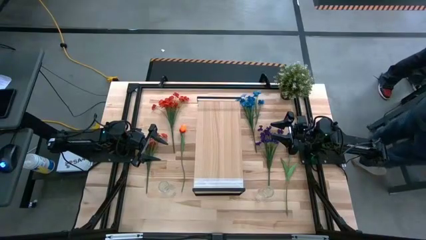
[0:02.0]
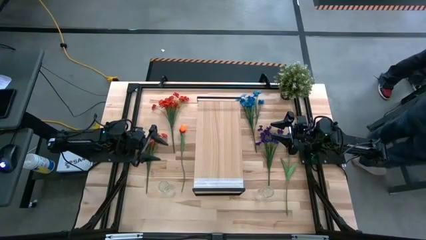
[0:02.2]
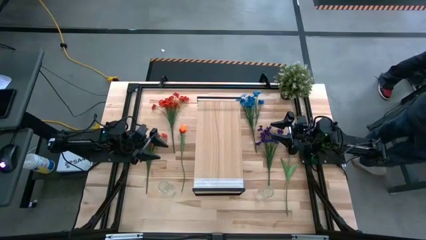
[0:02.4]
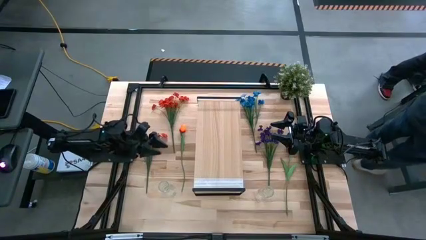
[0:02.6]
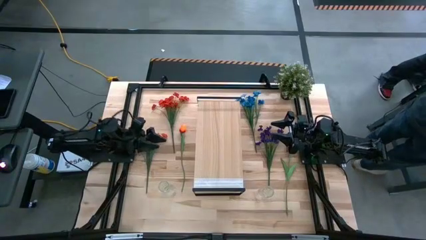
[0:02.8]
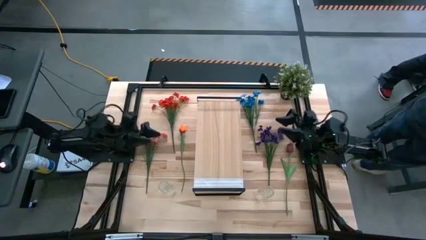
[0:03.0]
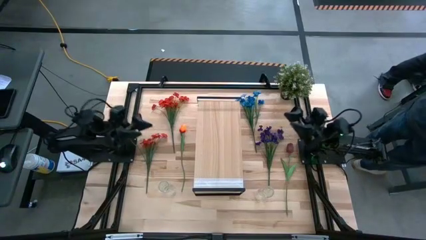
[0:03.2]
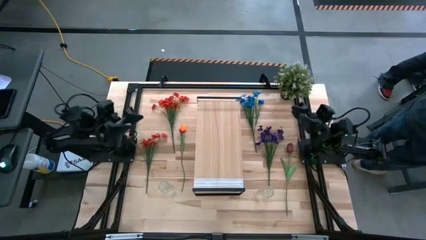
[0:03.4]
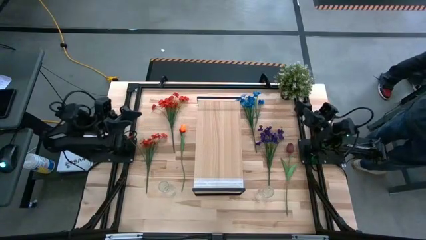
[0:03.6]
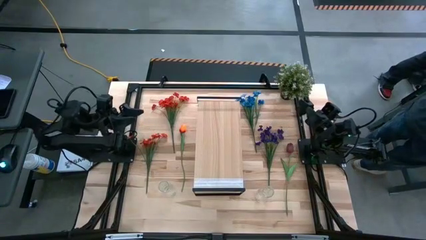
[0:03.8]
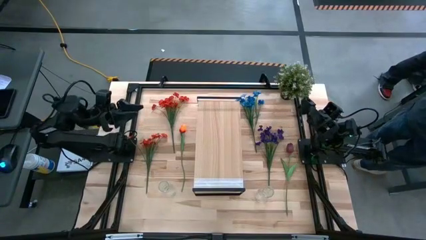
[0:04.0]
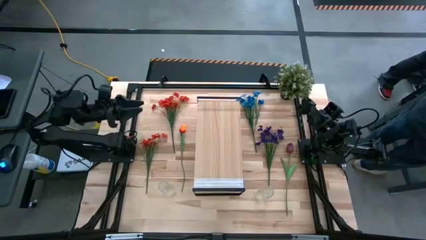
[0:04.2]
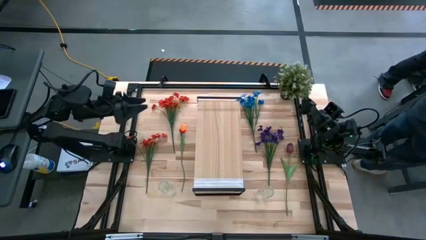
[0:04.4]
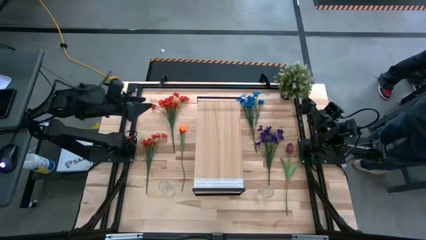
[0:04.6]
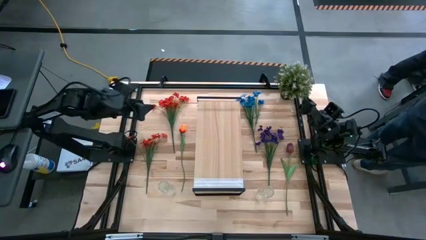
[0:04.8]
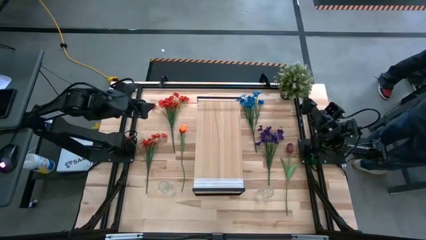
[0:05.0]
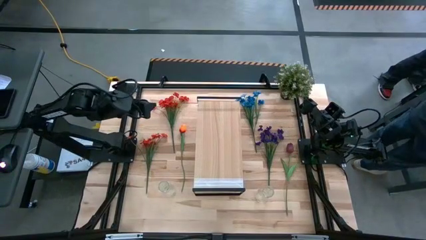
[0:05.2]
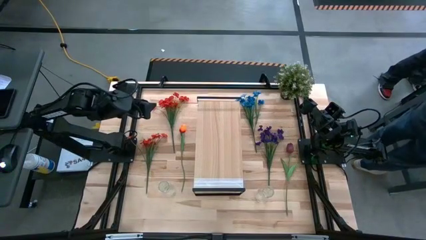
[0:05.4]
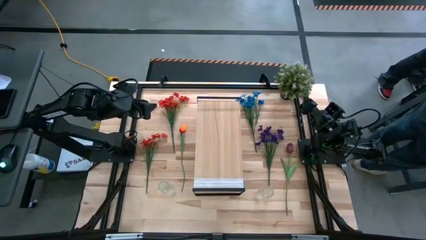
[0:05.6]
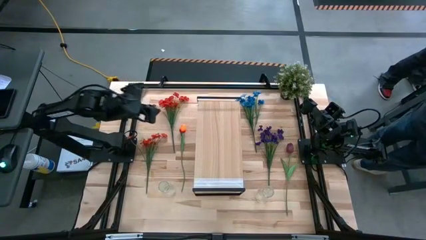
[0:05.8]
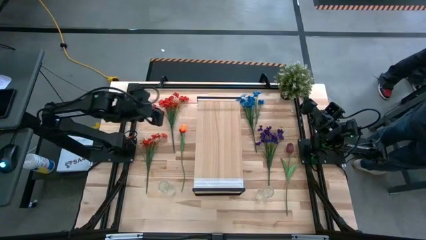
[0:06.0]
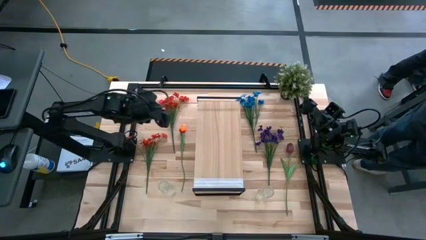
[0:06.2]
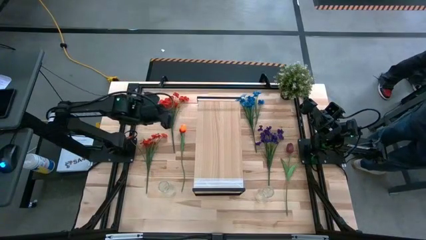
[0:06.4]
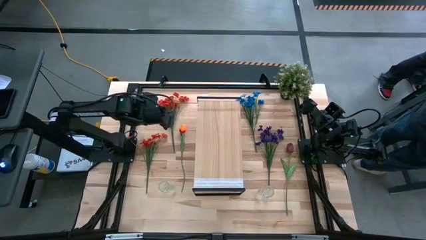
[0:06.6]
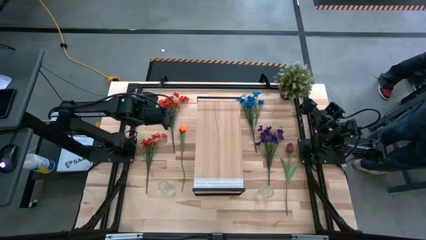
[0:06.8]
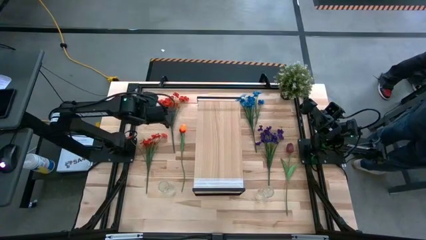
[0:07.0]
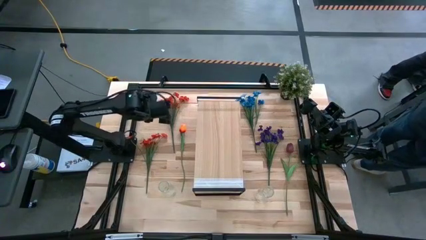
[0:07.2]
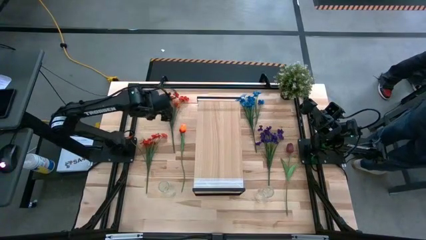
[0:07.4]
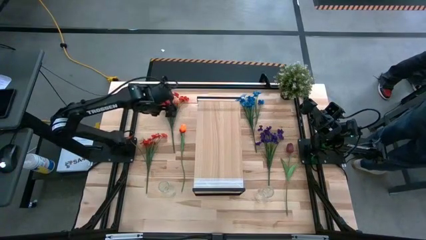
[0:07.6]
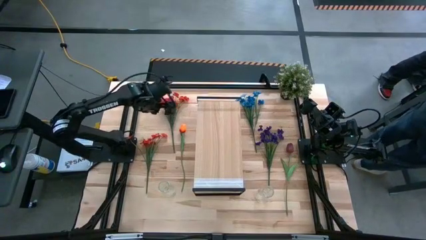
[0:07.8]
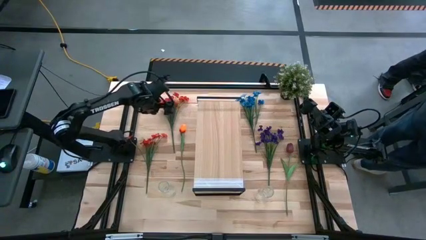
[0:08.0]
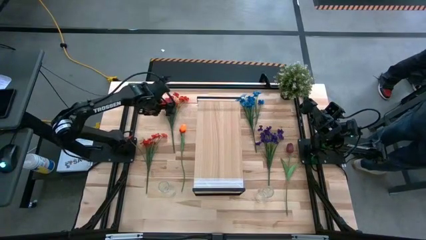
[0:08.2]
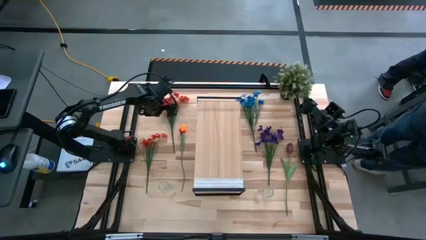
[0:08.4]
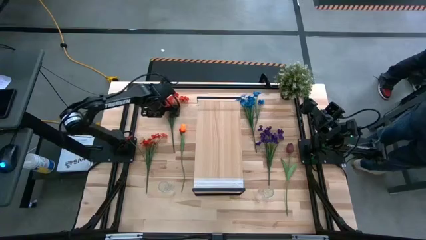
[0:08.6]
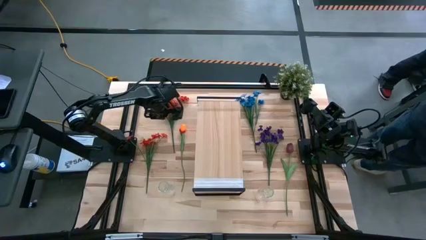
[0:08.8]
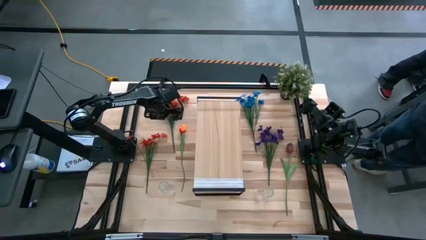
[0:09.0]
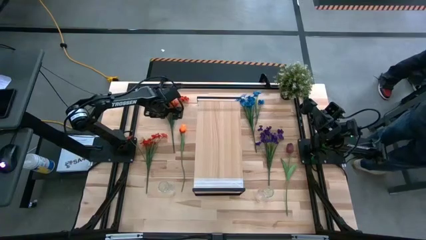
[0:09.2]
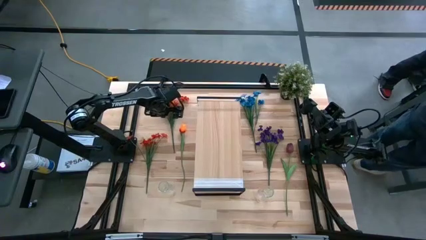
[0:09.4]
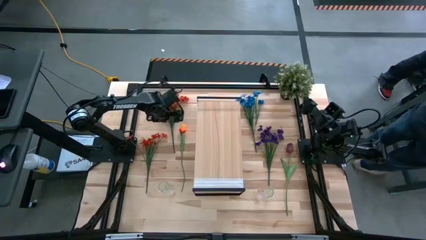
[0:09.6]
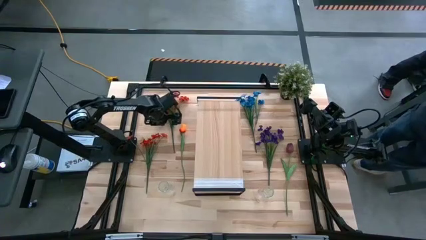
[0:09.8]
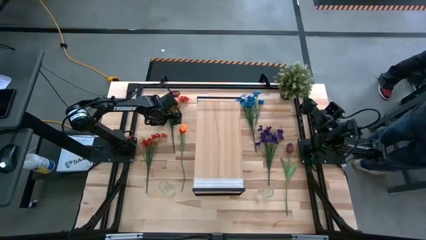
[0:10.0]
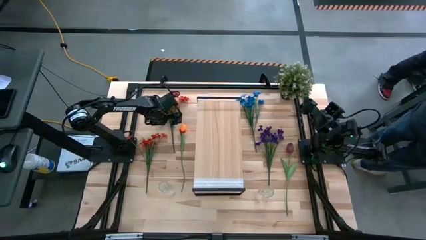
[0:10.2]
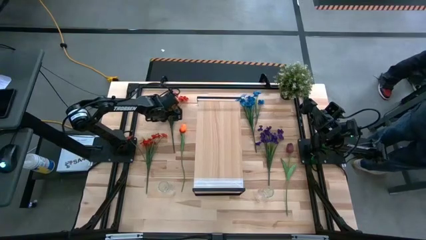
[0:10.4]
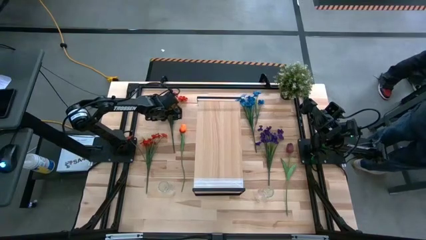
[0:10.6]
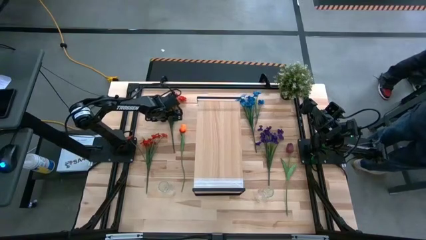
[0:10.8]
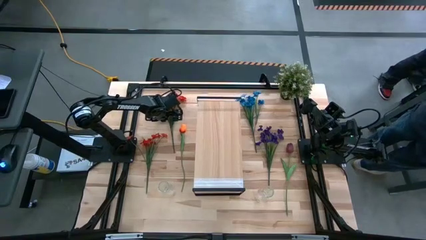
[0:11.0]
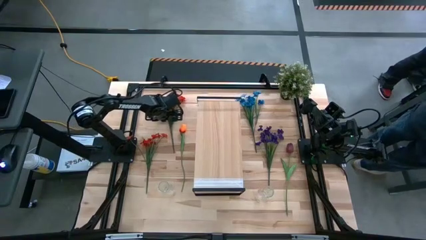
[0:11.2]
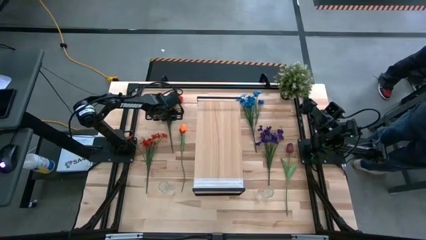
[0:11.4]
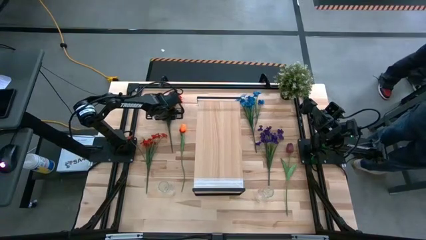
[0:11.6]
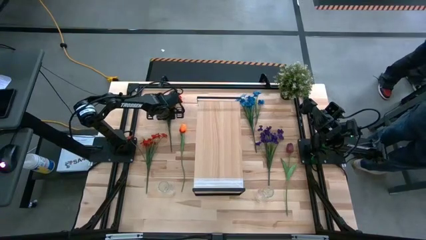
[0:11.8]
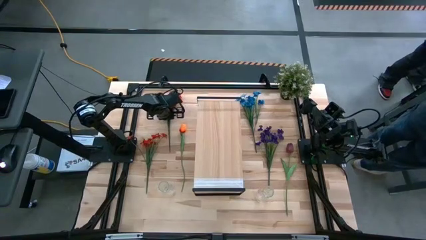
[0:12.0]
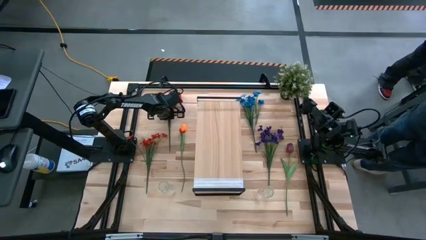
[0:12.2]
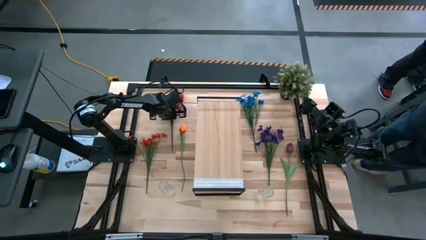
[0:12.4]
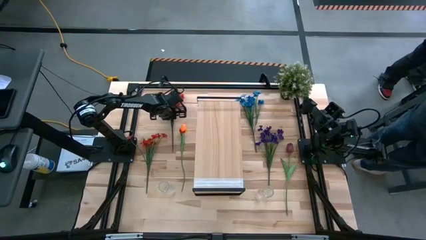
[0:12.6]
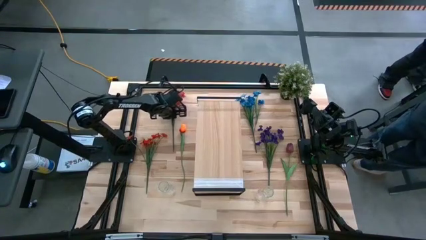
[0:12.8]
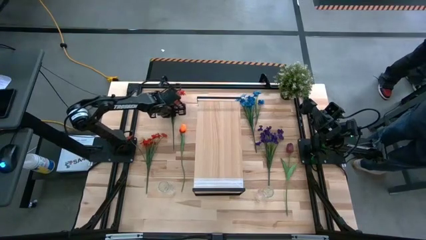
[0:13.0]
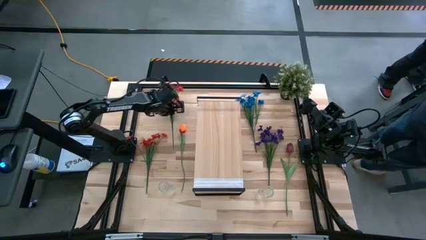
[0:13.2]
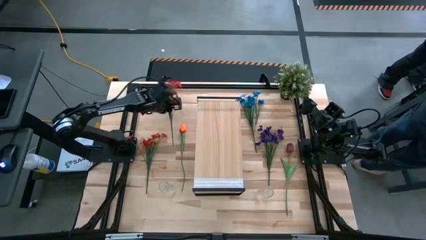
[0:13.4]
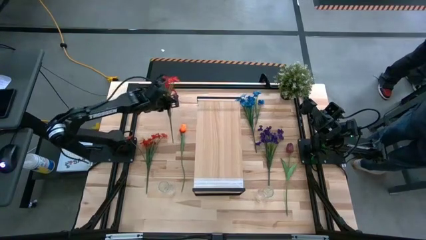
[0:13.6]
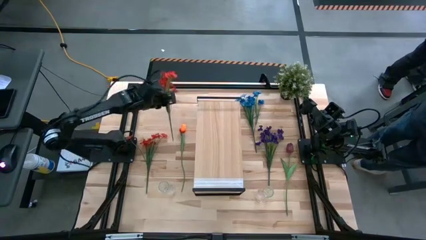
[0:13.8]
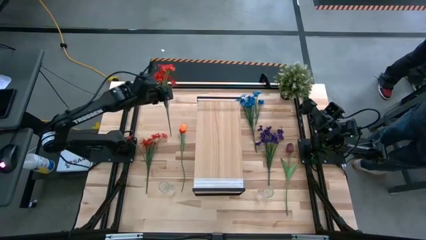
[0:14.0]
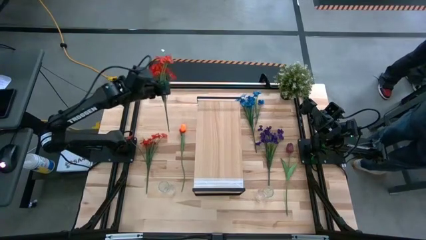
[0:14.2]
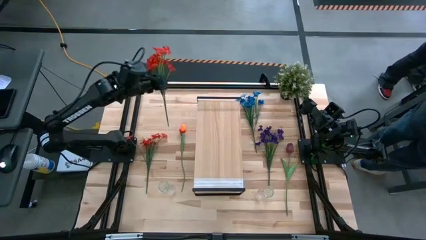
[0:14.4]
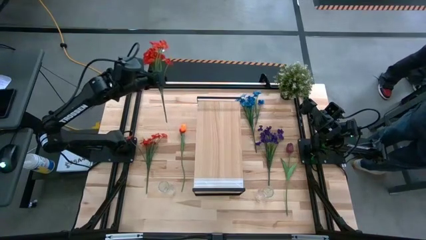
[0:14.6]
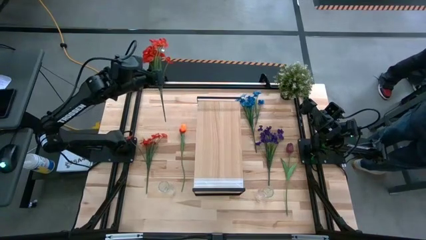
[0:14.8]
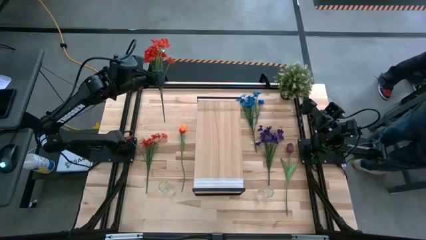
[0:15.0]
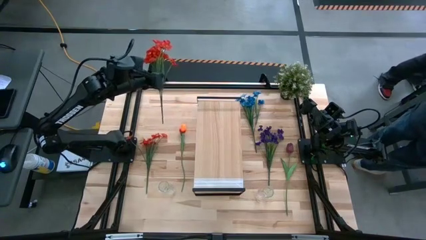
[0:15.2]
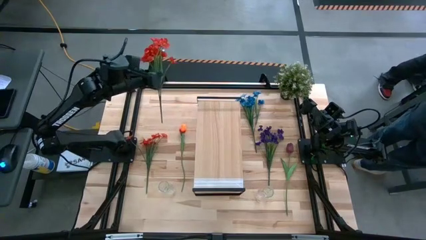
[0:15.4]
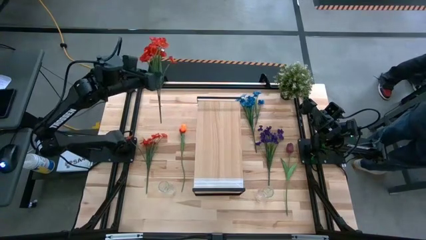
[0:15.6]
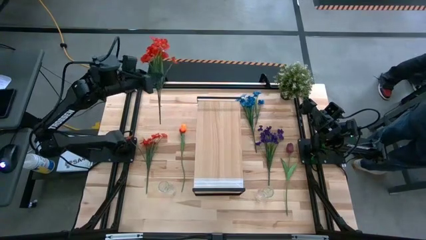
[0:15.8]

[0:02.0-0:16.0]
Task: Pick and place flowers into a vace then onto a shelf
Put the top orange flowers into the left transparent vase
